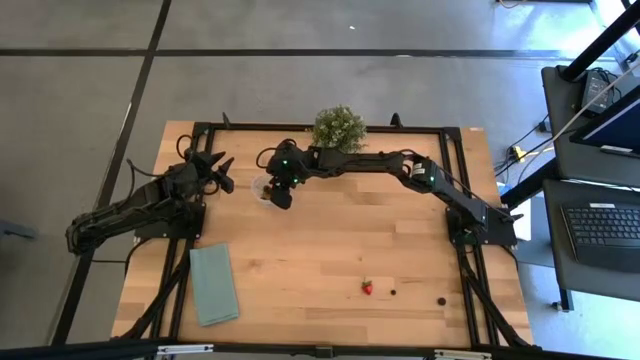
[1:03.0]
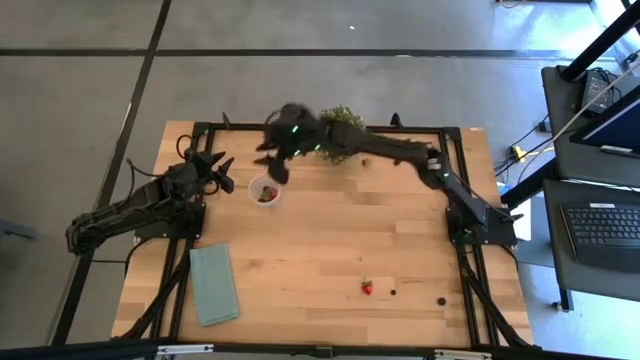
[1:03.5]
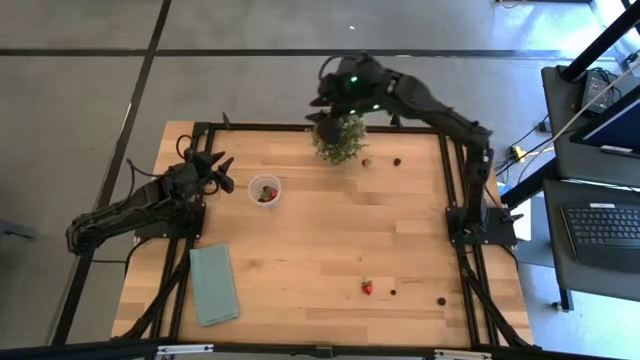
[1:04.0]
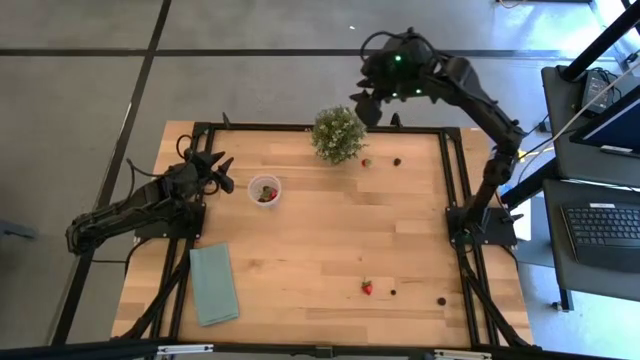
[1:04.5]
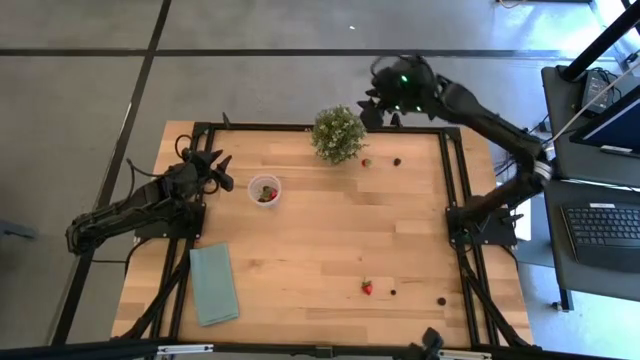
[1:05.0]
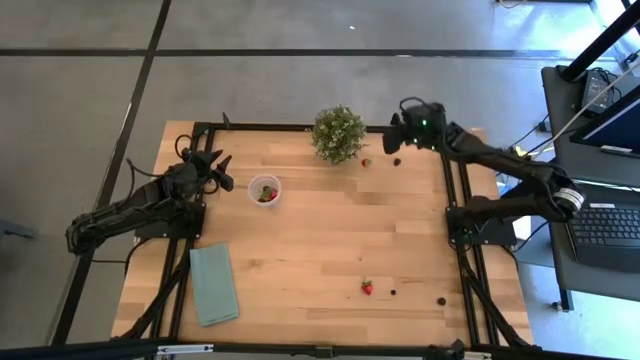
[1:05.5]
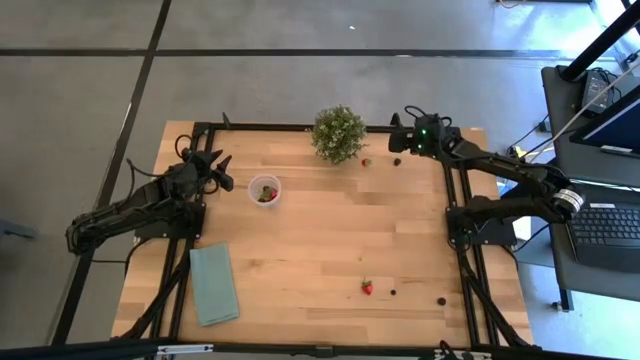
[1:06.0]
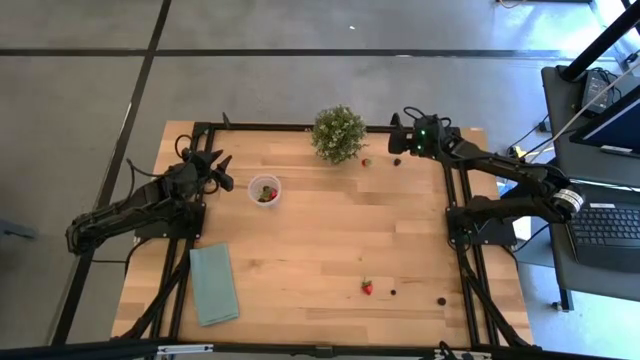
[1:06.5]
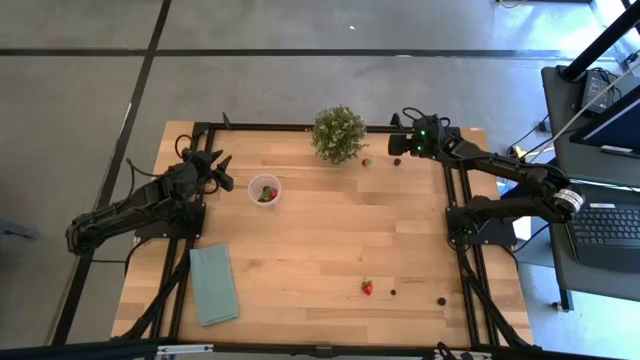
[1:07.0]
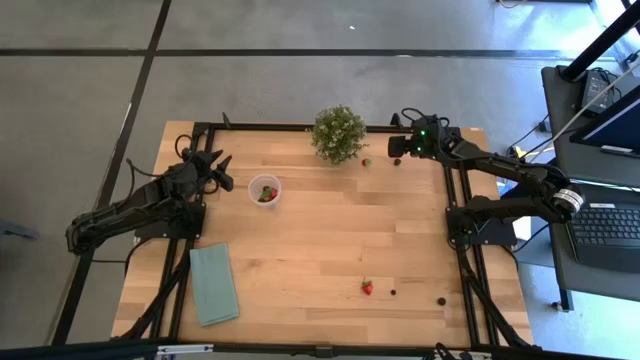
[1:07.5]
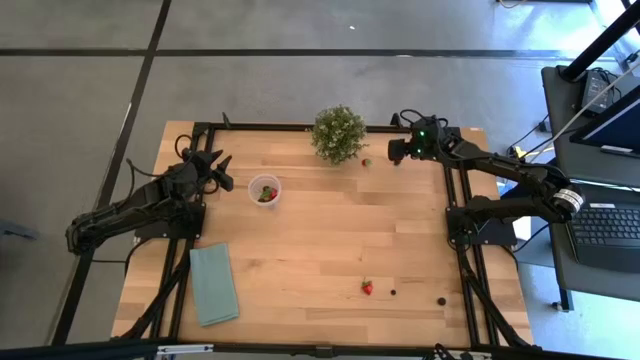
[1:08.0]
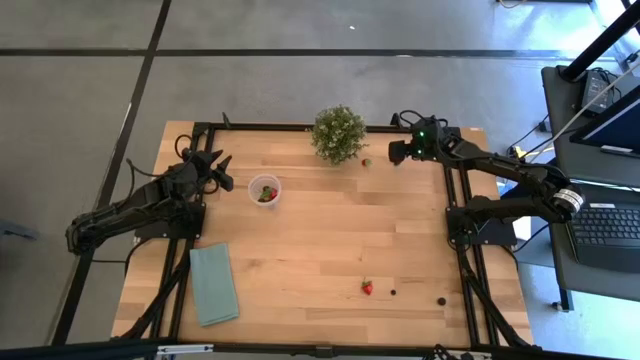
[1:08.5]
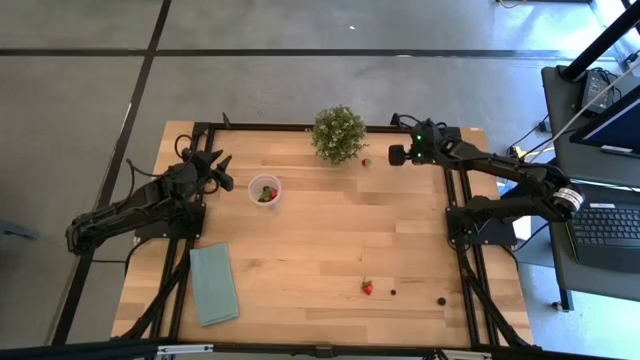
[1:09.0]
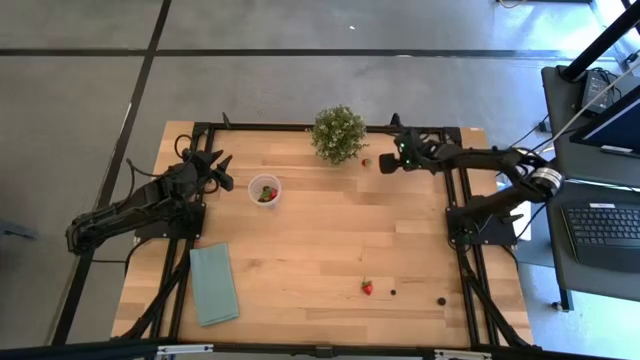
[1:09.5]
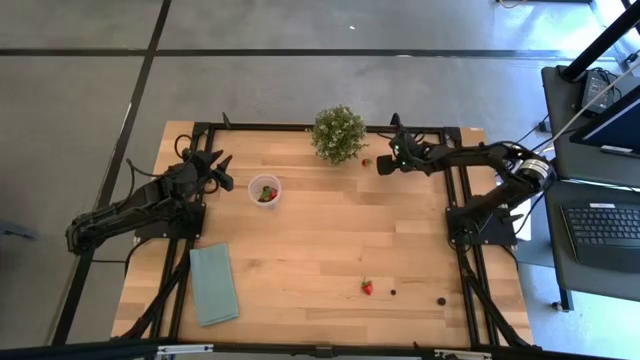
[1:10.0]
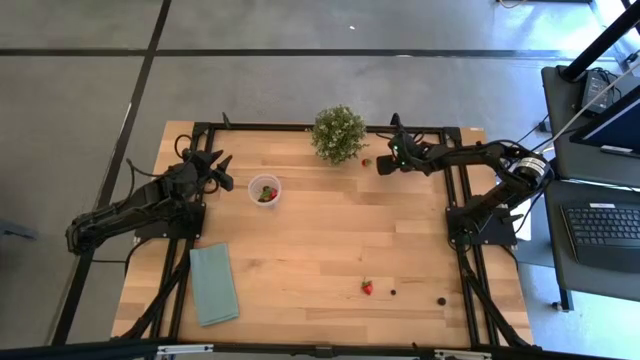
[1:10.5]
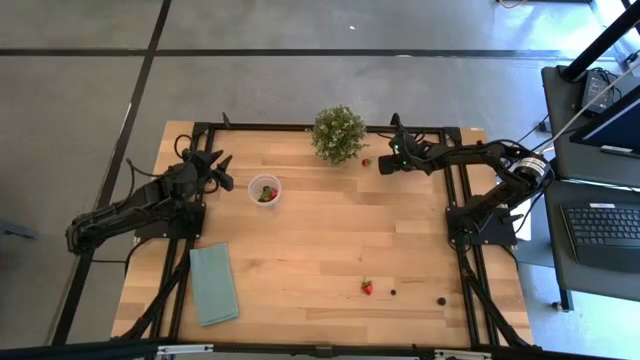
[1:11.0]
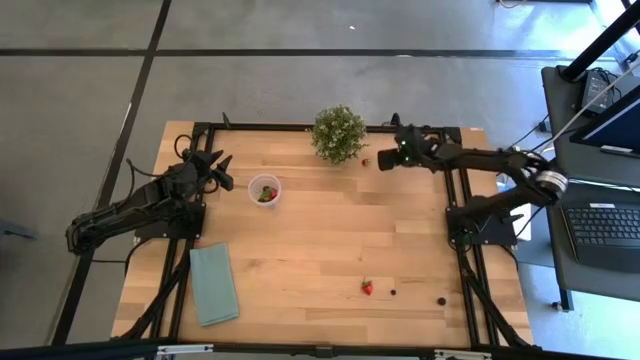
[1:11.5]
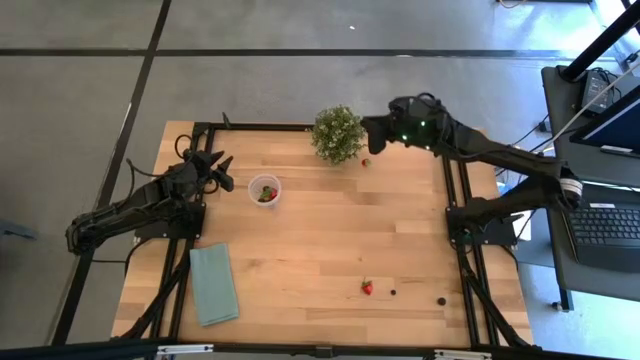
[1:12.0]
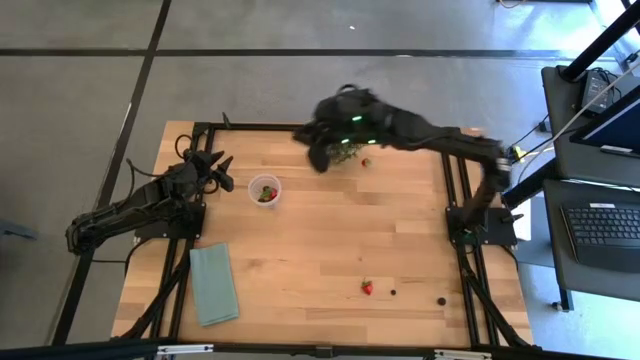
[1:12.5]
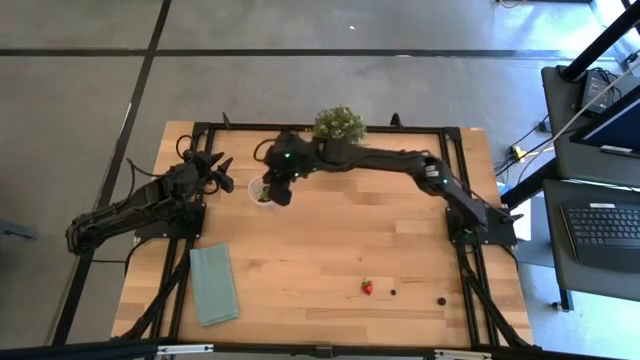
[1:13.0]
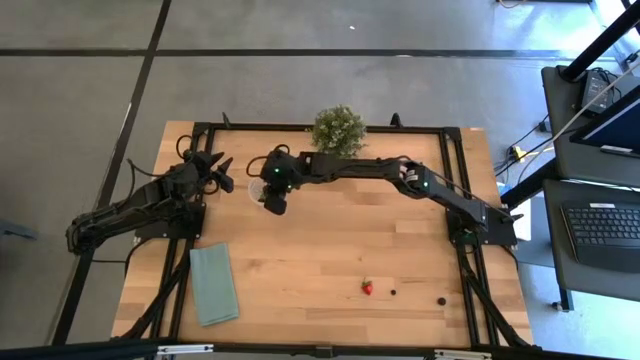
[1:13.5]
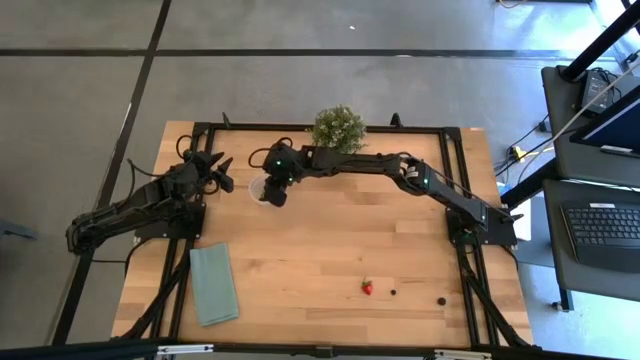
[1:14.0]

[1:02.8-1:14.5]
Task: Pick and placing Produce into tupperware
Put the blackberry into the transparent container

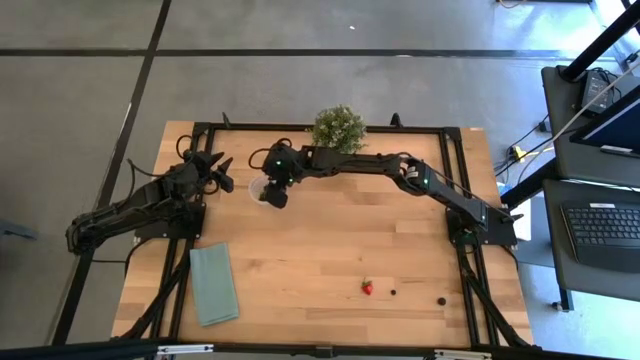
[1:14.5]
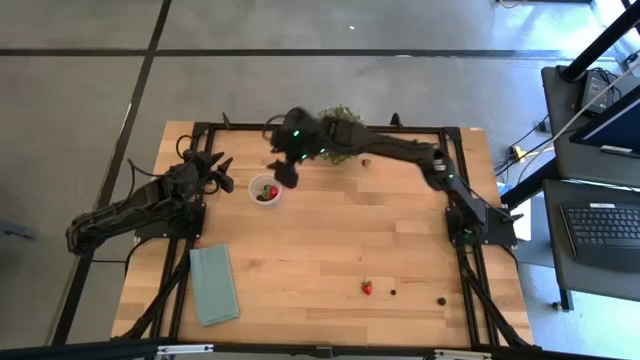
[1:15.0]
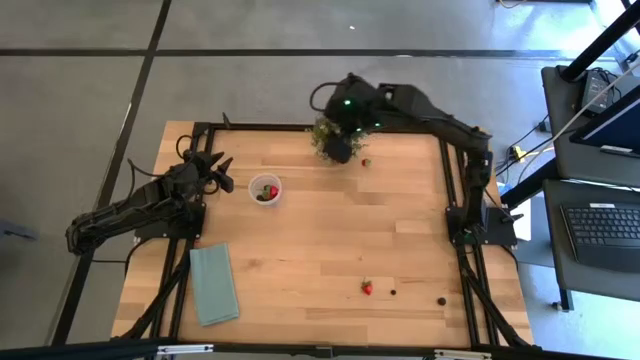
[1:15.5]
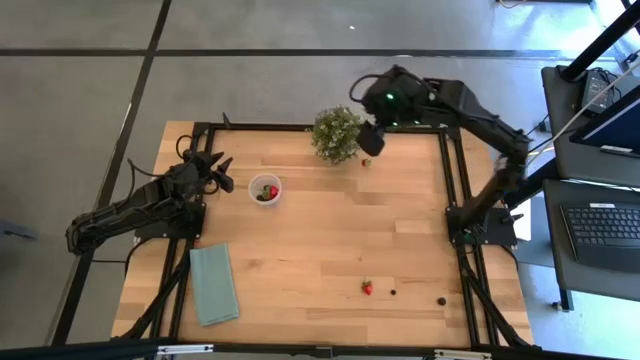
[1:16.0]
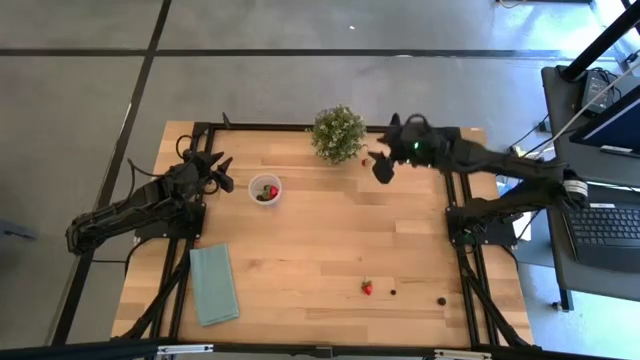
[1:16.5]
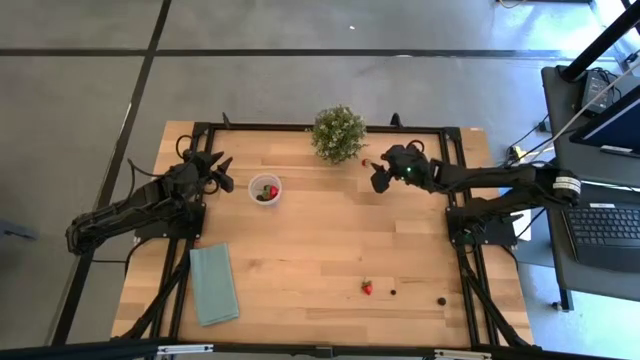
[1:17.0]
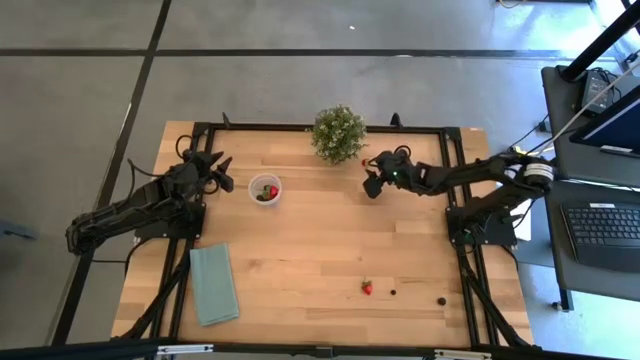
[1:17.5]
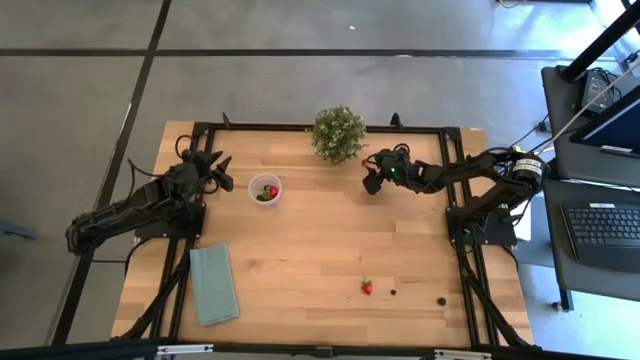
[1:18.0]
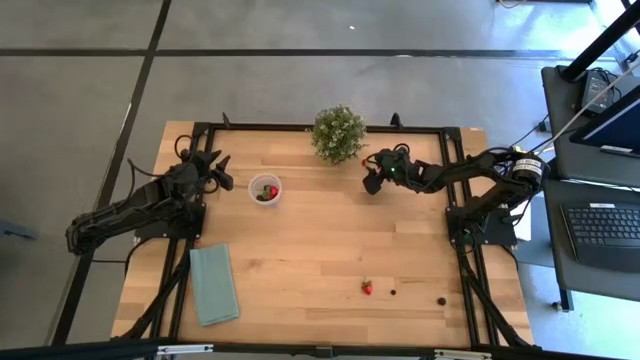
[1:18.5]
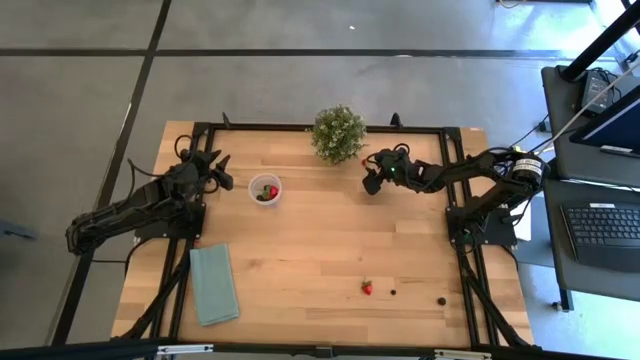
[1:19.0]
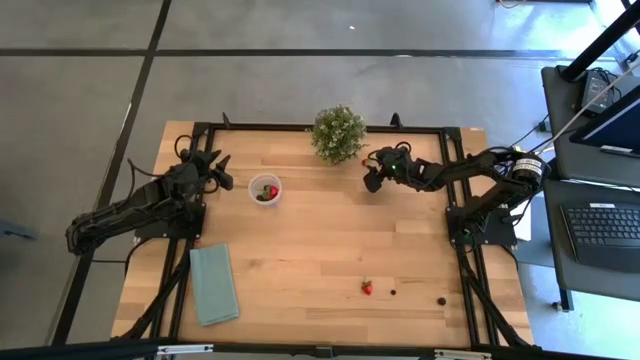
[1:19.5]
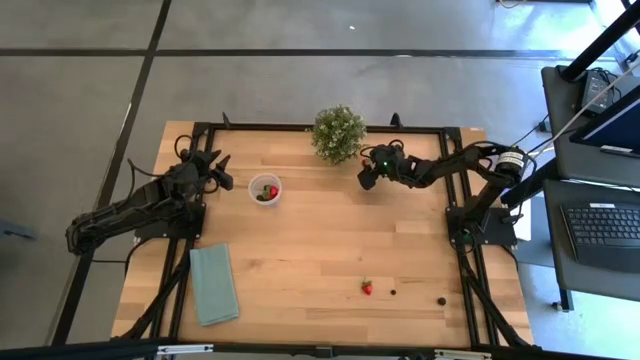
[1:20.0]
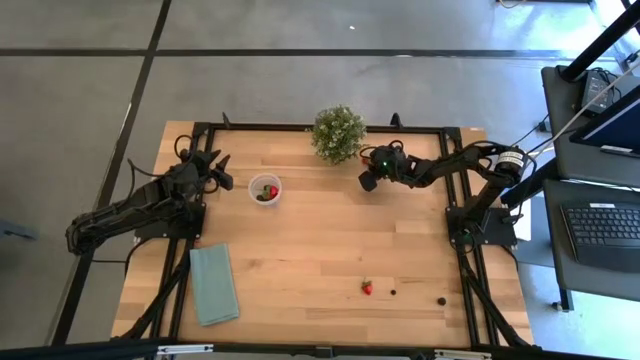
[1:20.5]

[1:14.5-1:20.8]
Put the red strawberry into the transparent container

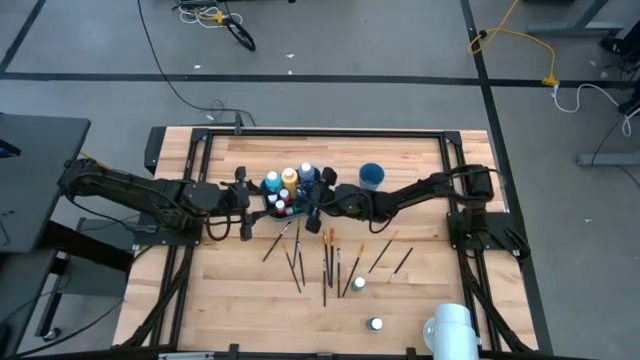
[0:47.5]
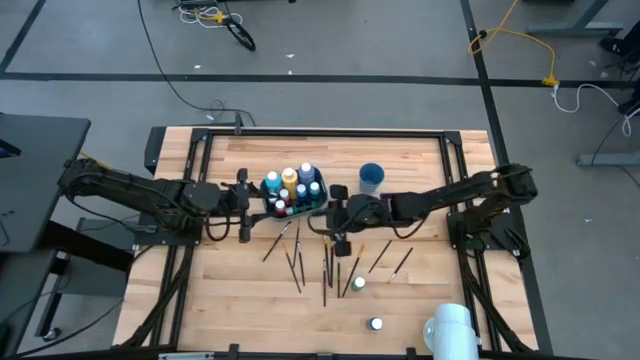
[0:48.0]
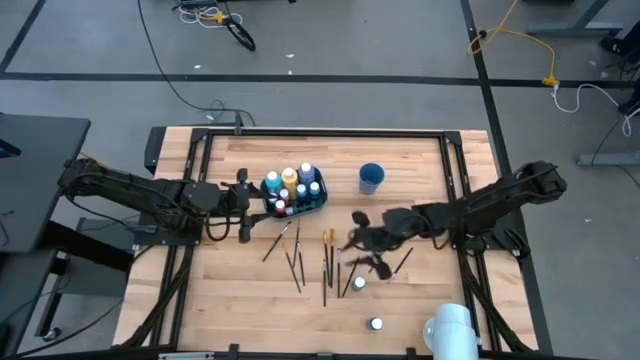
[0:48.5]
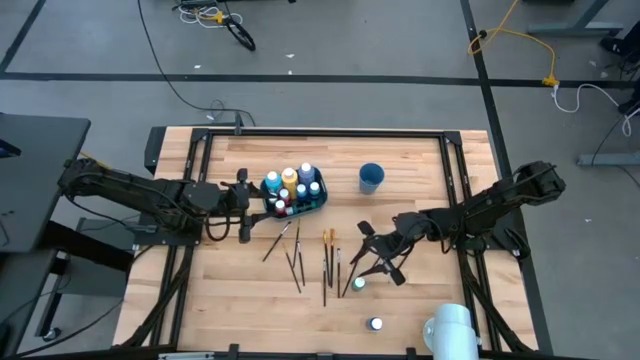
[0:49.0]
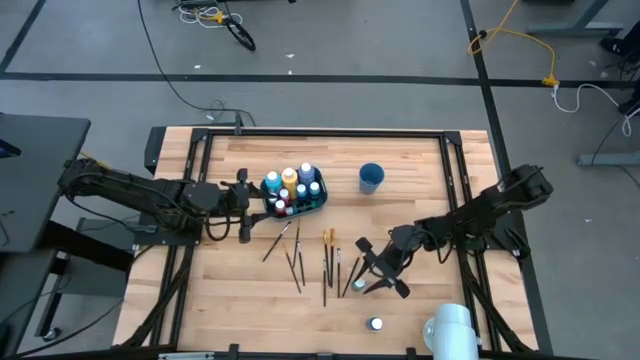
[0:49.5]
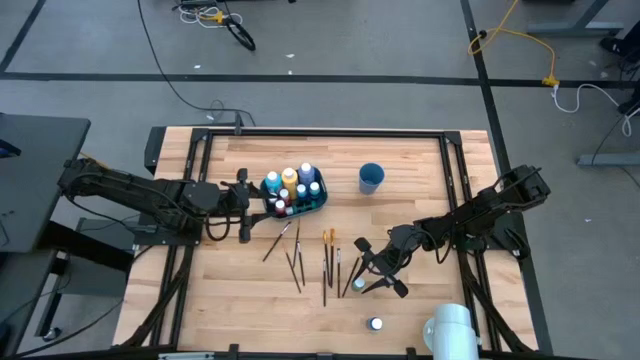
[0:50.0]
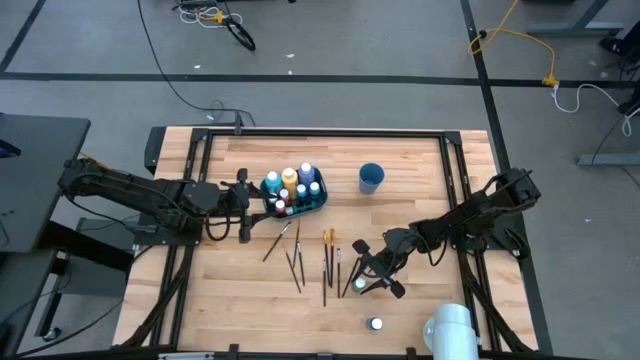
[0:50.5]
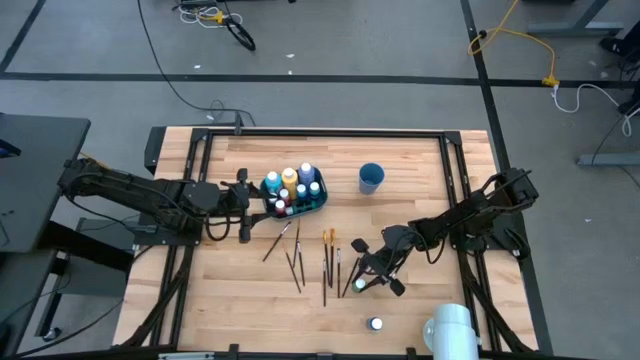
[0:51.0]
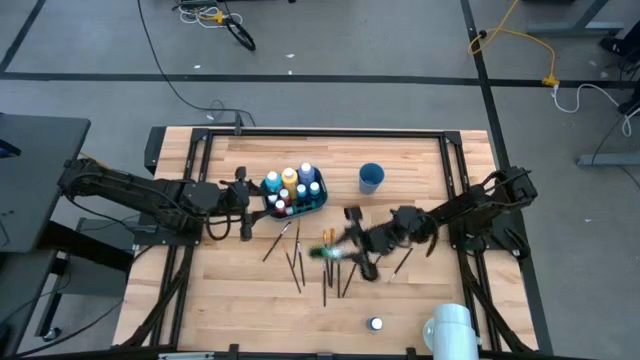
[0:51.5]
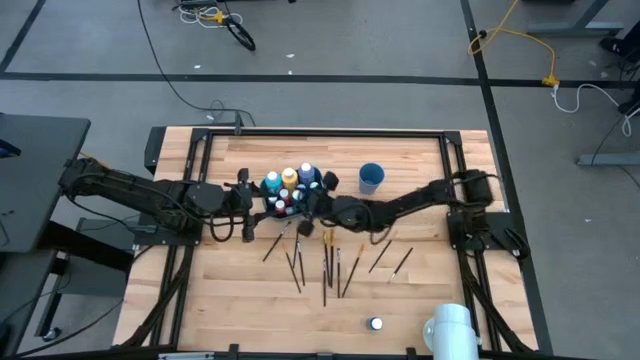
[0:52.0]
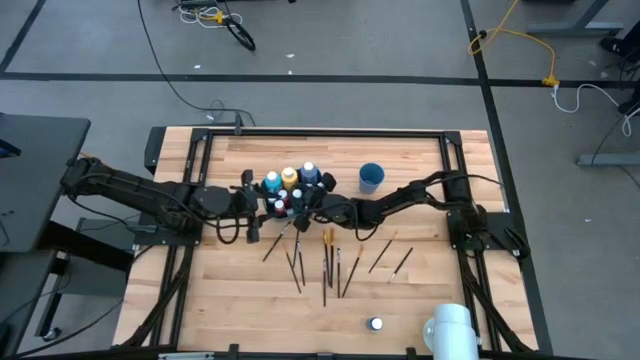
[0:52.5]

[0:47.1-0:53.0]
Task: Pick & Place Paint Supplies
Put the green paint bottle into the blue bin
